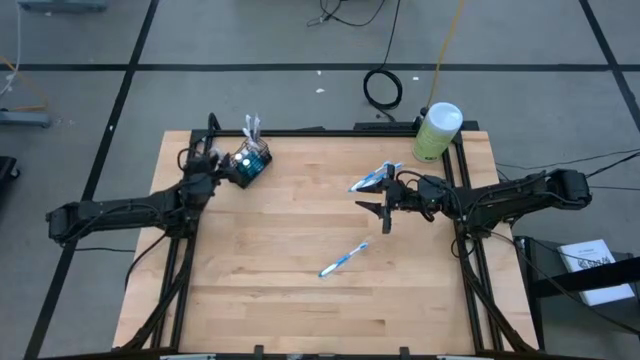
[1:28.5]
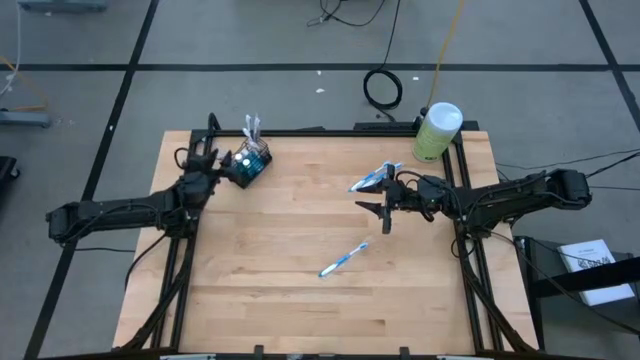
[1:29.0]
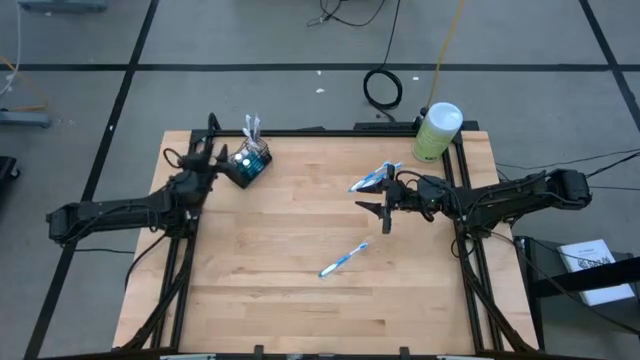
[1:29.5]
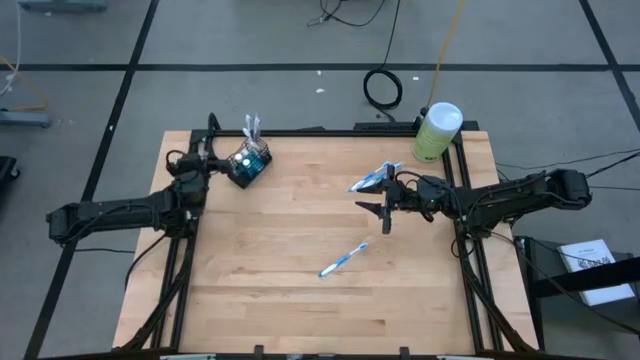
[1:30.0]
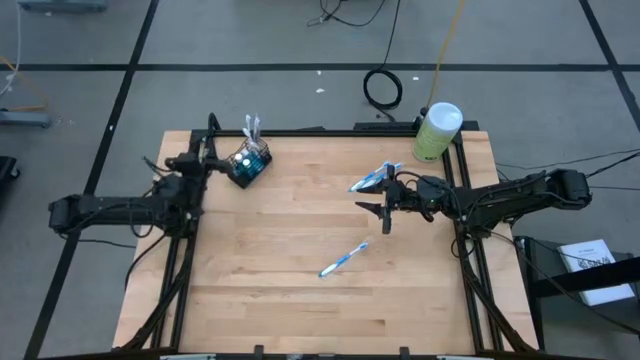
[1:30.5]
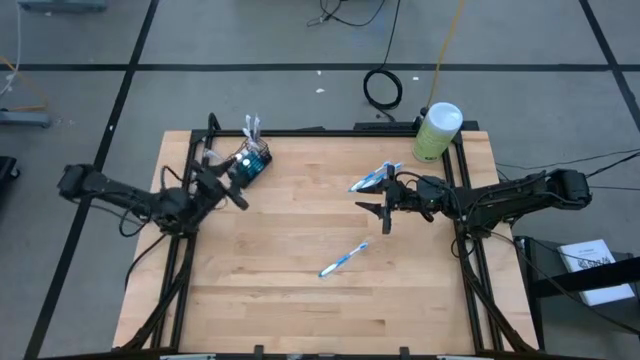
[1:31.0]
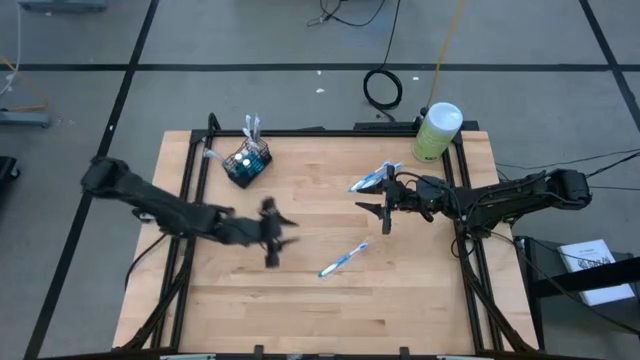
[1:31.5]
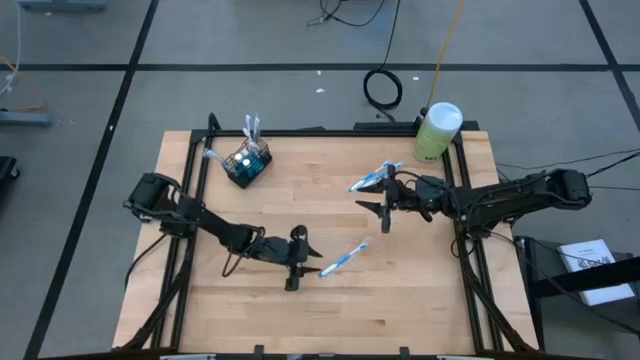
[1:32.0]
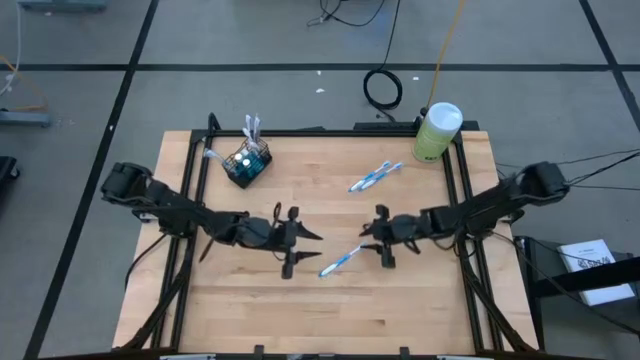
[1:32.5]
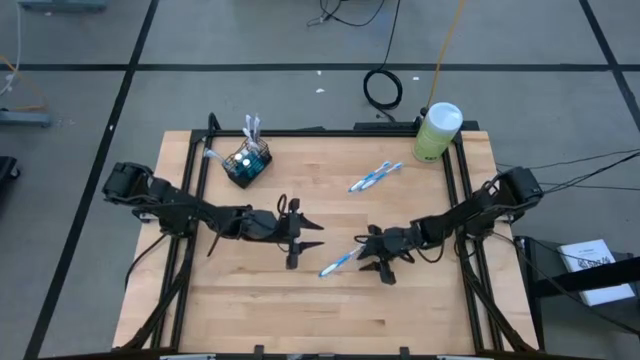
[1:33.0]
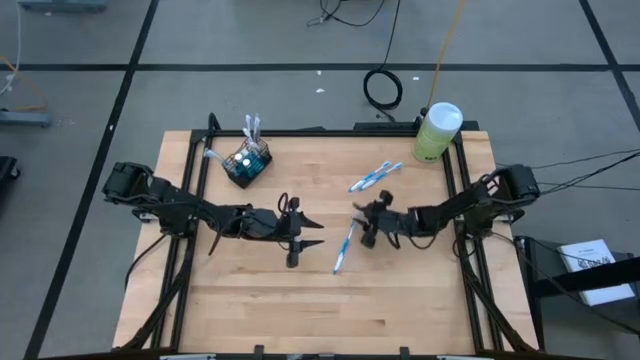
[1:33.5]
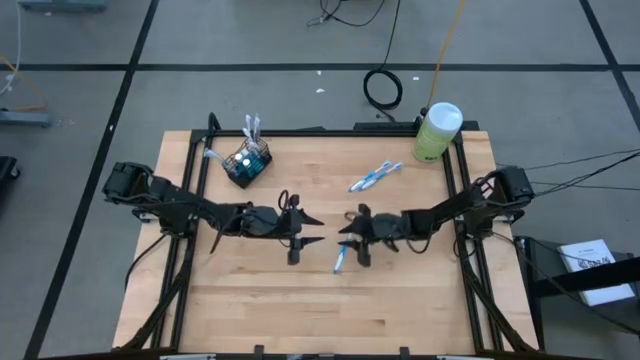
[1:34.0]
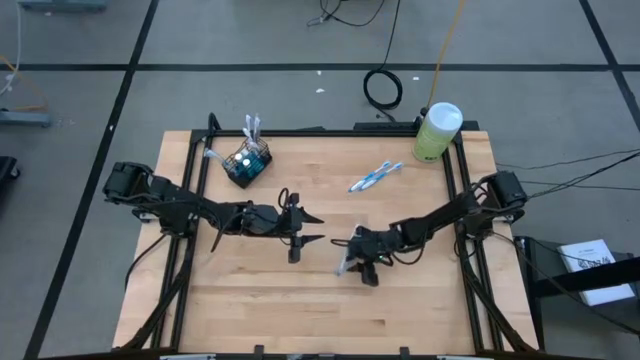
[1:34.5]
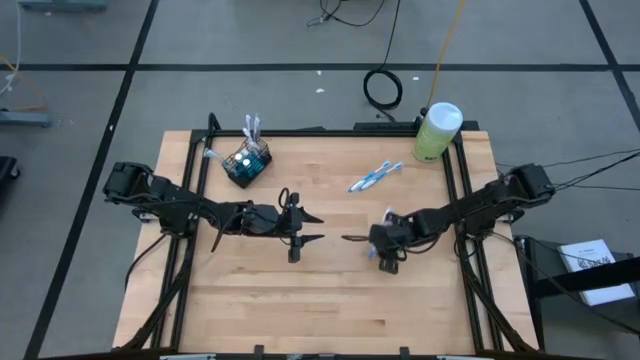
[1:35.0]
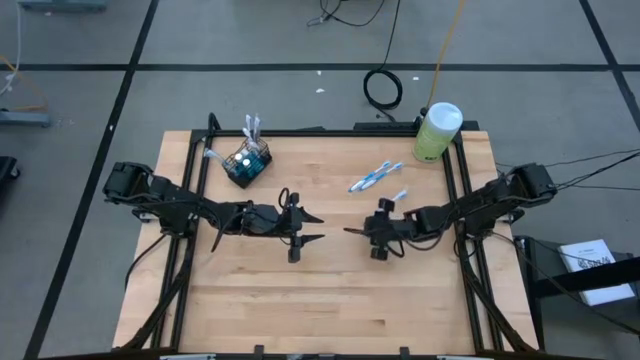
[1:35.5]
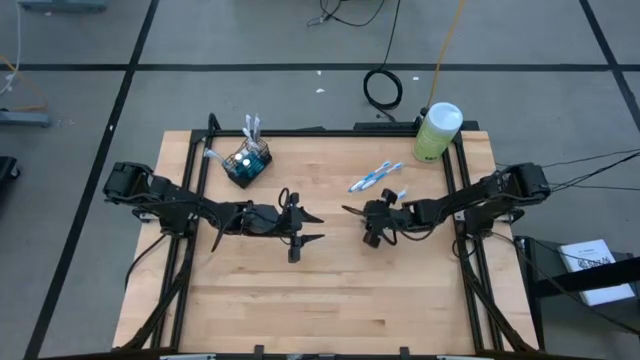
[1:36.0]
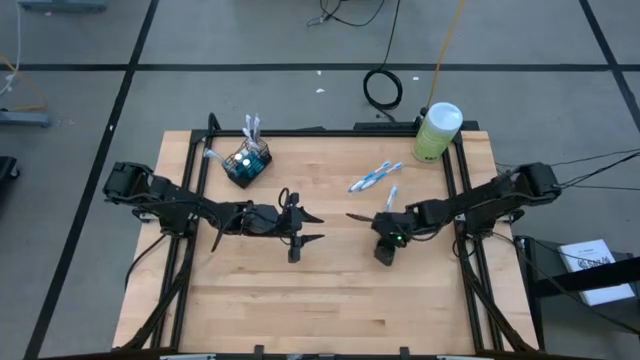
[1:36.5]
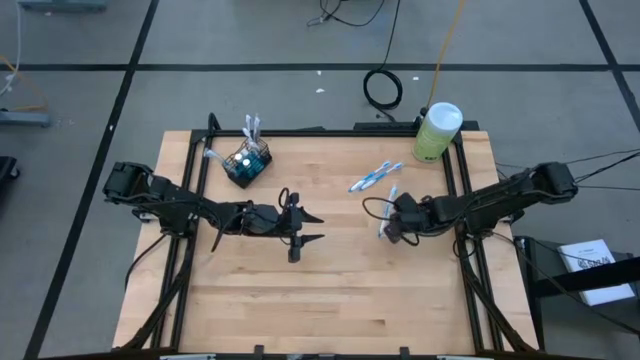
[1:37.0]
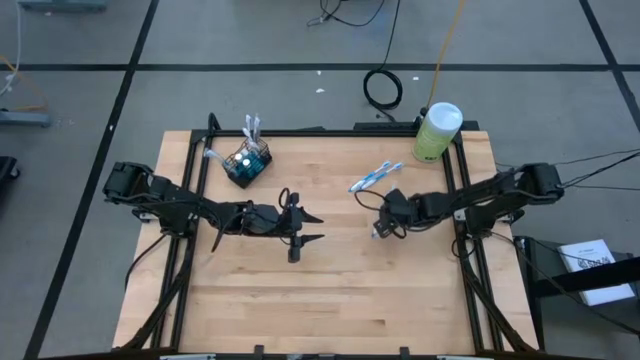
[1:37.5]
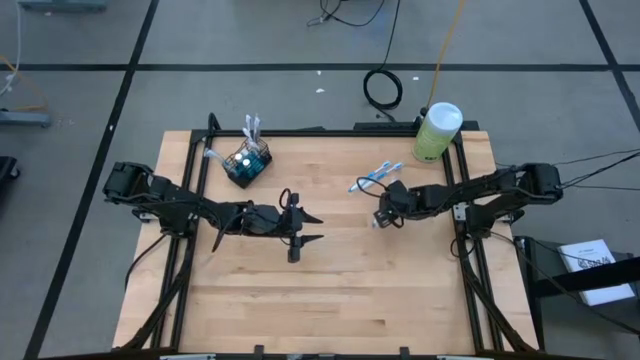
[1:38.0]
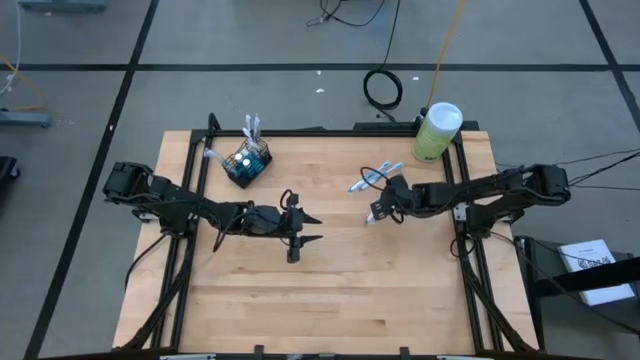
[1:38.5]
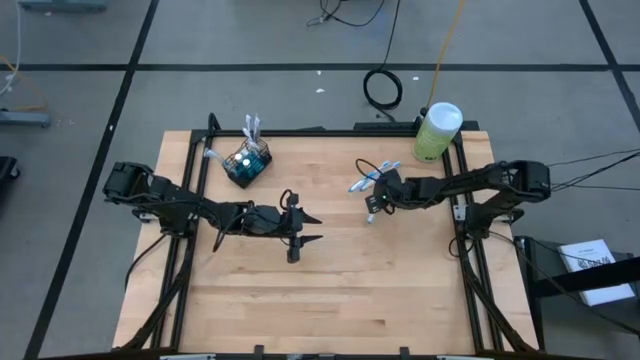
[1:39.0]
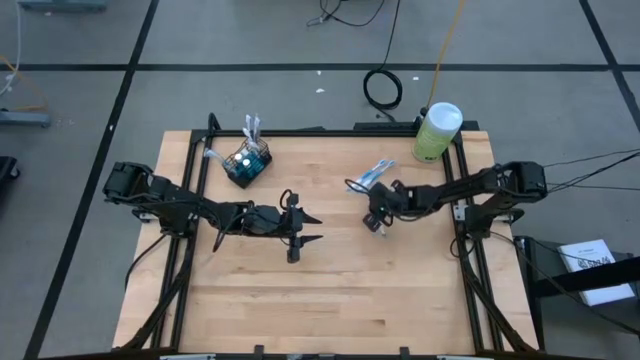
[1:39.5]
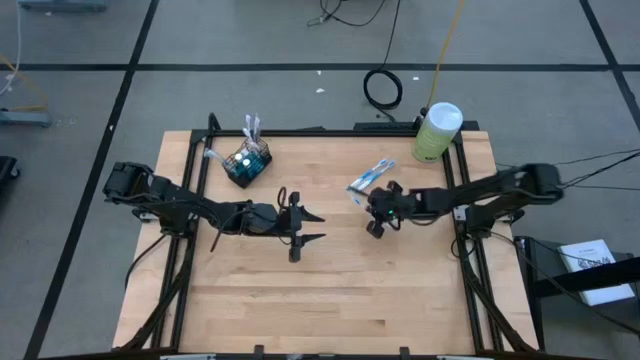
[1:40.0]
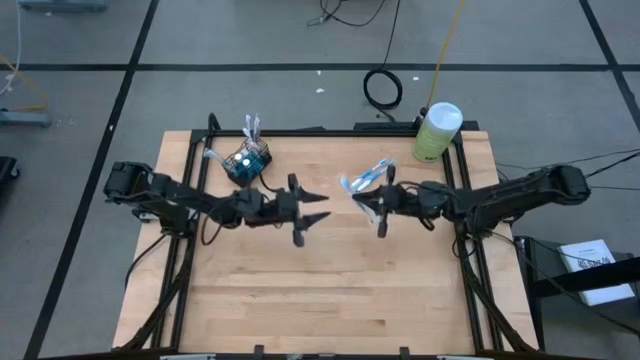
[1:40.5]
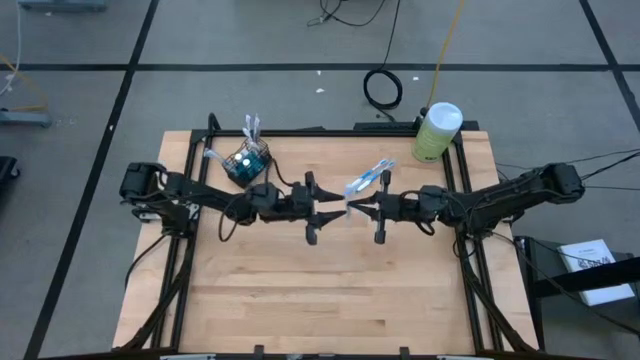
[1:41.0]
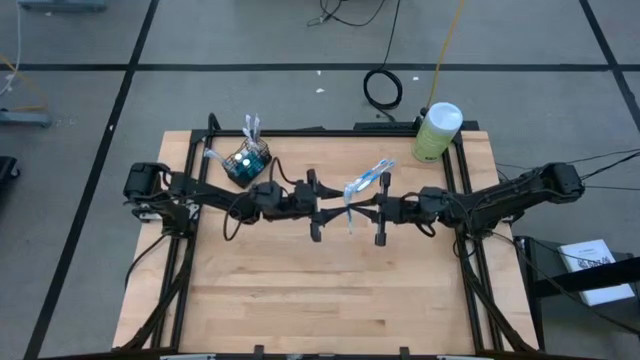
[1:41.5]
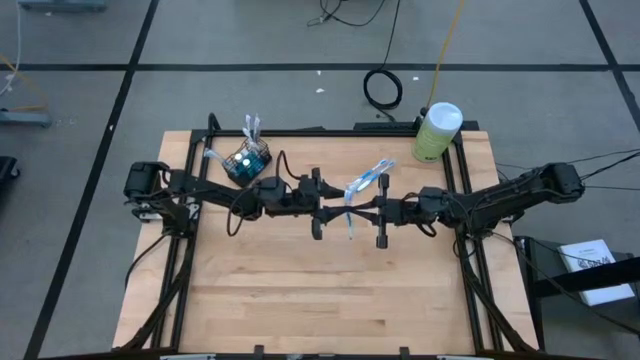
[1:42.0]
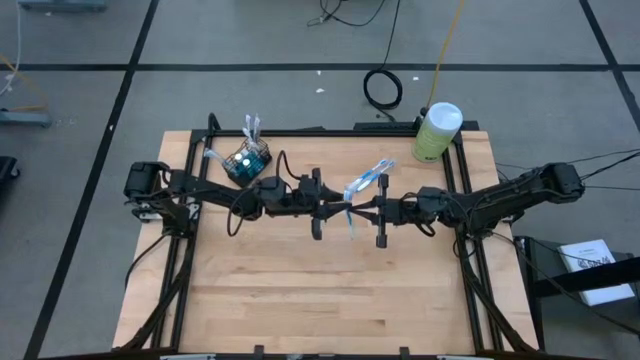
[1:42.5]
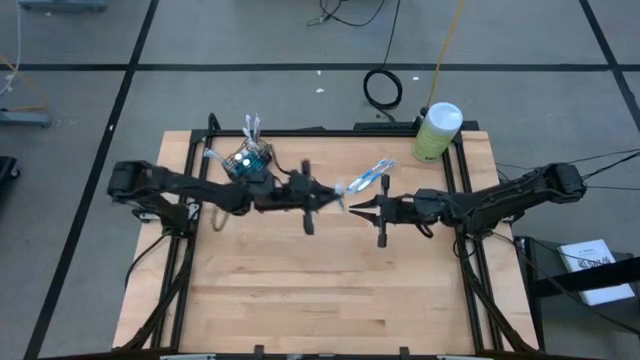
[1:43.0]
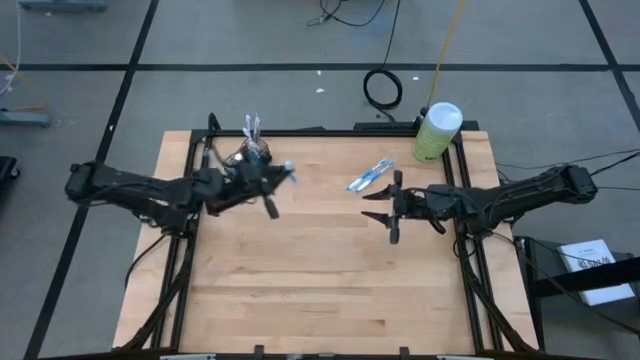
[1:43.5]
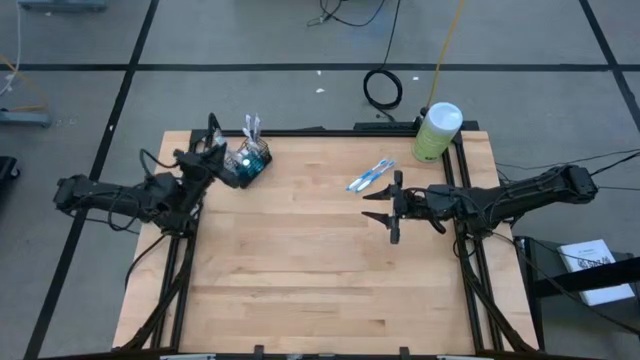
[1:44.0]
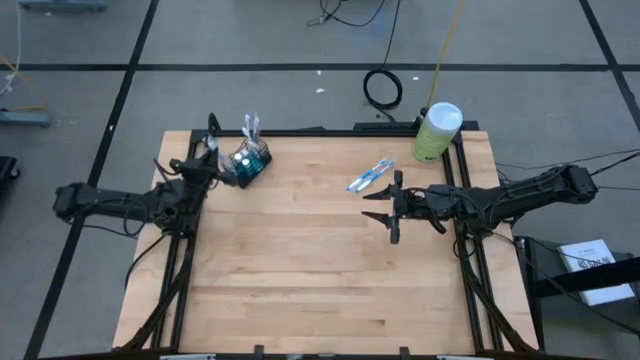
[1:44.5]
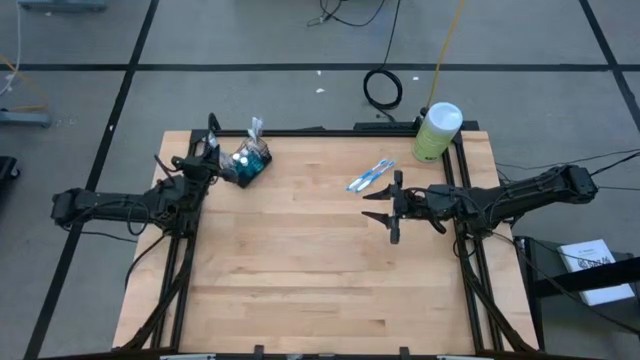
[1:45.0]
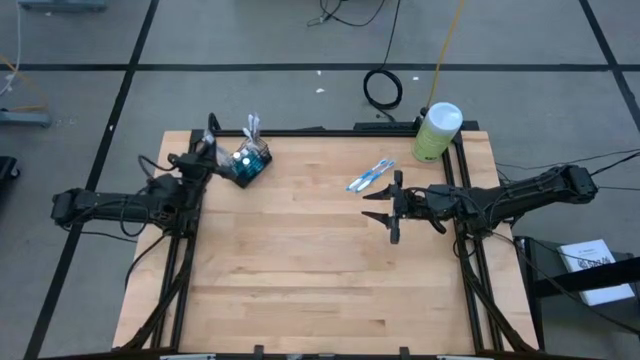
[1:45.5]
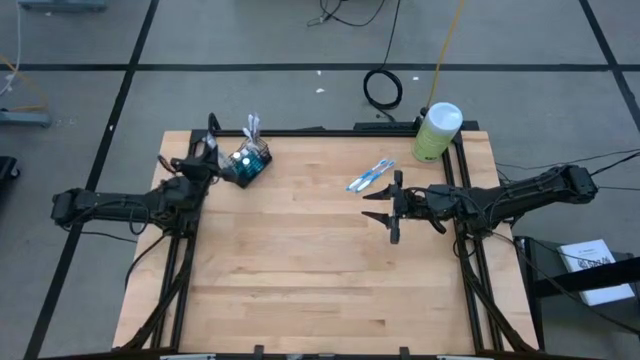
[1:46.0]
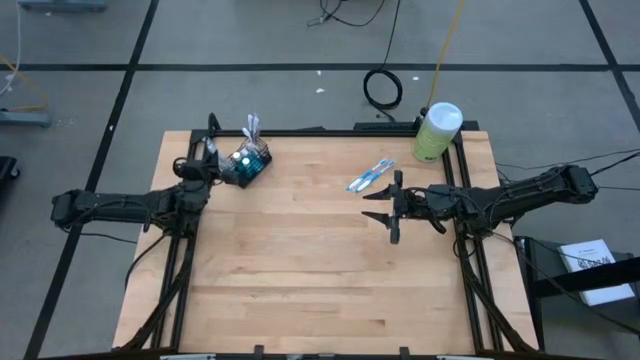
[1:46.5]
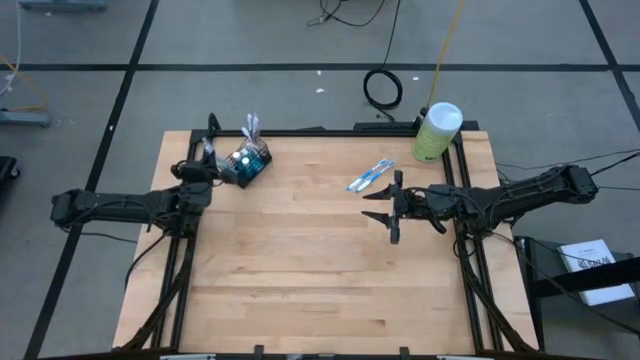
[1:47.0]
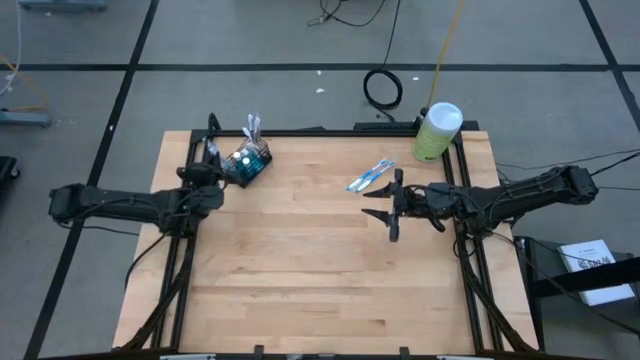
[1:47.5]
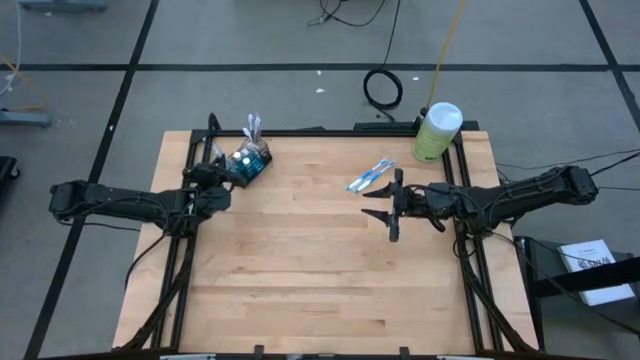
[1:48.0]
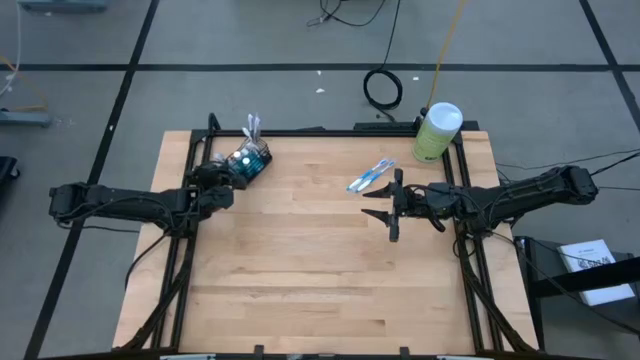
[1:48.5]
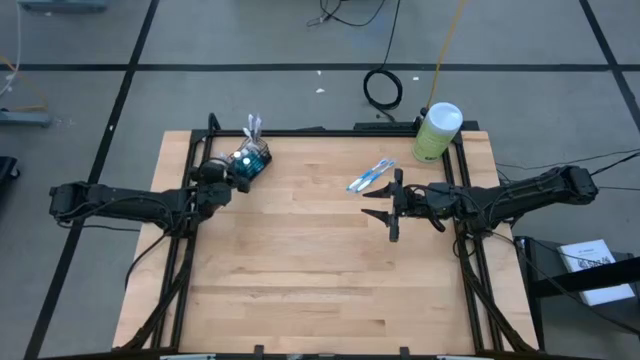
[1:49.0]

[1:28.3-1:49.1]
Task: Pick & Place toothbrushing station
Put the blue toothbrush into the left compartment of the wire organizer
